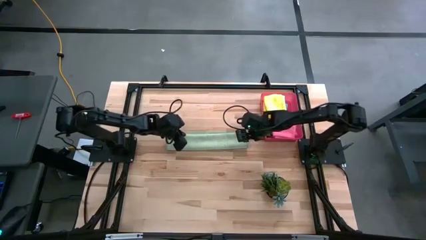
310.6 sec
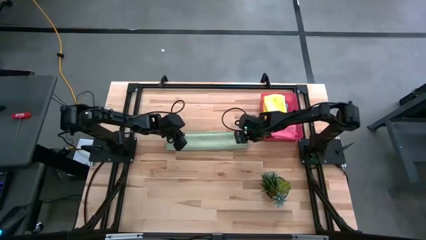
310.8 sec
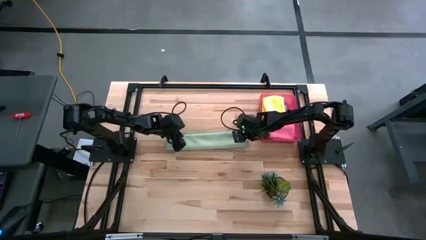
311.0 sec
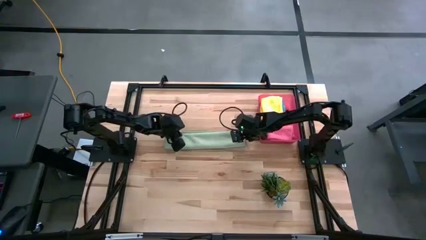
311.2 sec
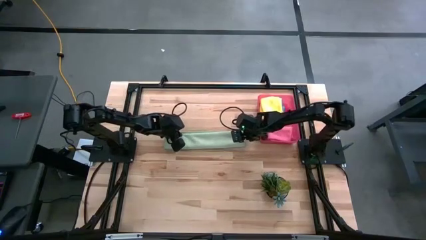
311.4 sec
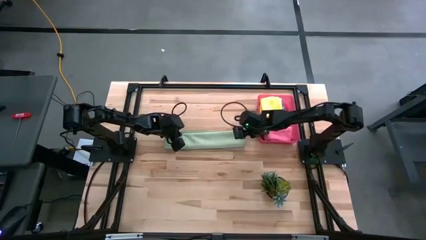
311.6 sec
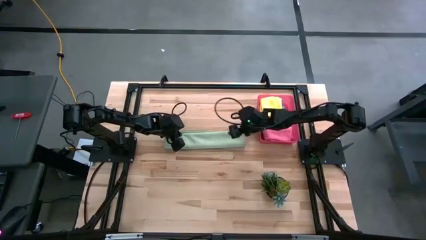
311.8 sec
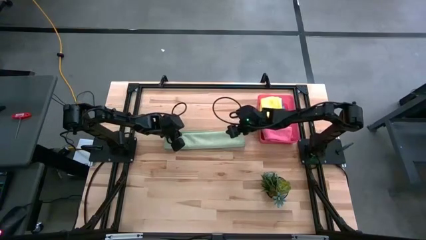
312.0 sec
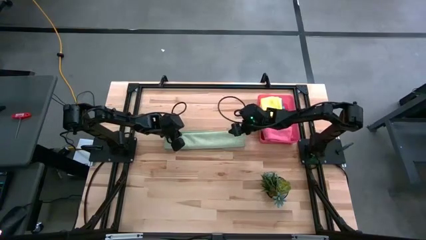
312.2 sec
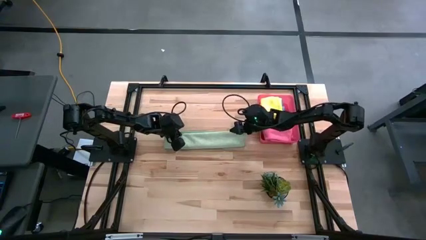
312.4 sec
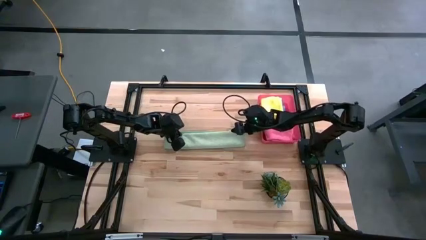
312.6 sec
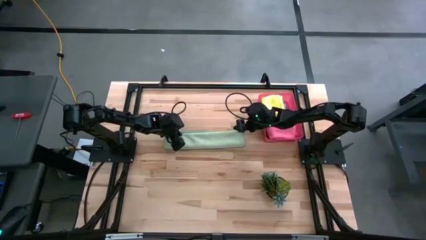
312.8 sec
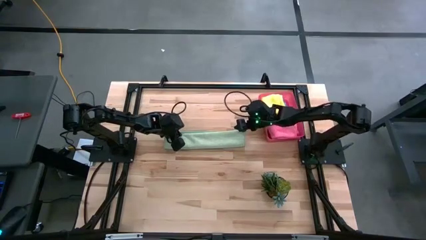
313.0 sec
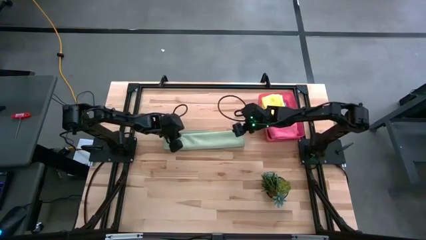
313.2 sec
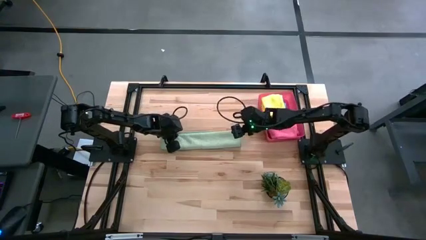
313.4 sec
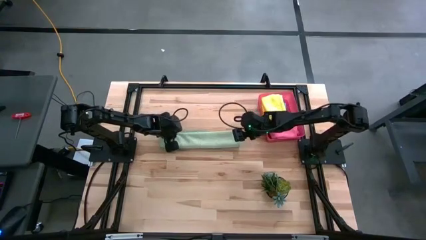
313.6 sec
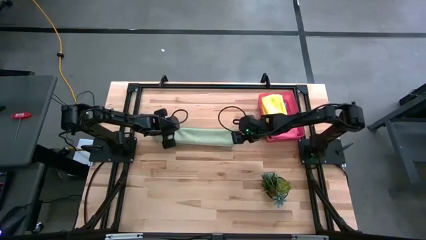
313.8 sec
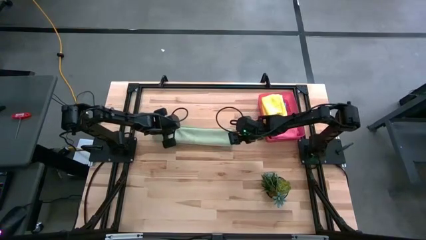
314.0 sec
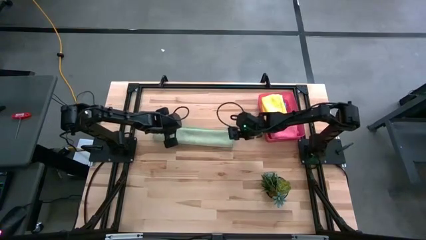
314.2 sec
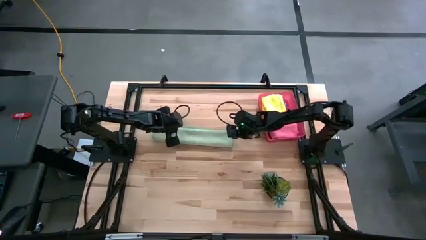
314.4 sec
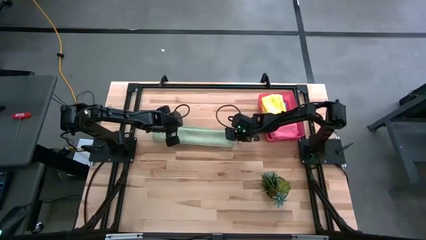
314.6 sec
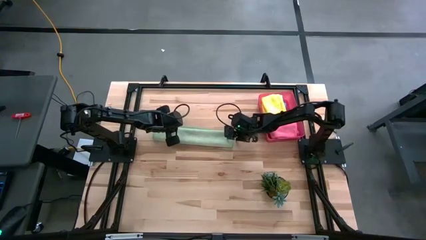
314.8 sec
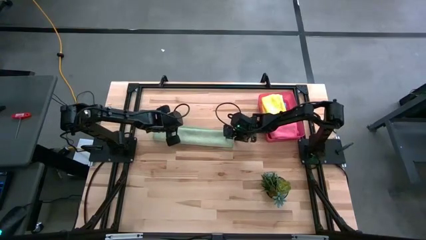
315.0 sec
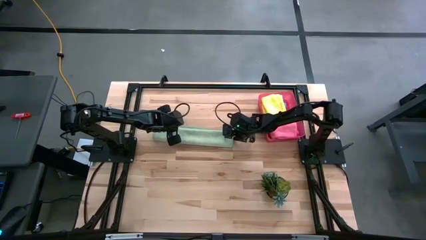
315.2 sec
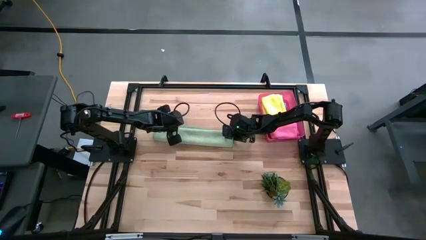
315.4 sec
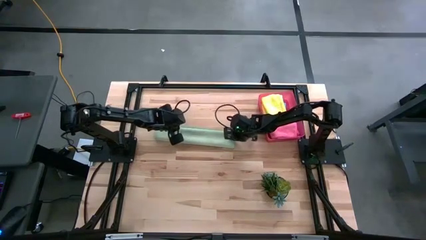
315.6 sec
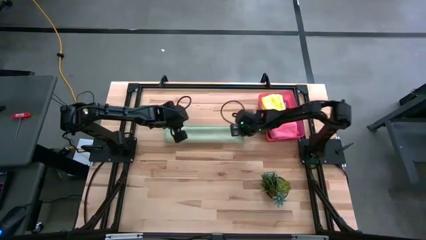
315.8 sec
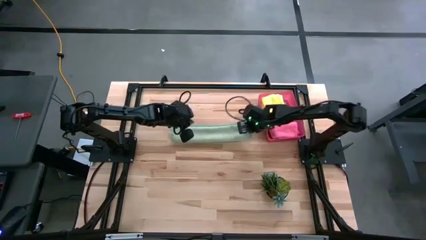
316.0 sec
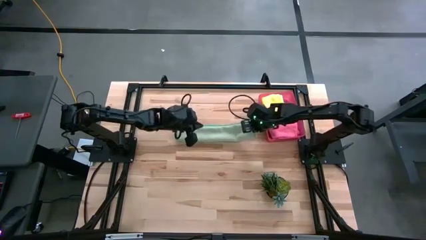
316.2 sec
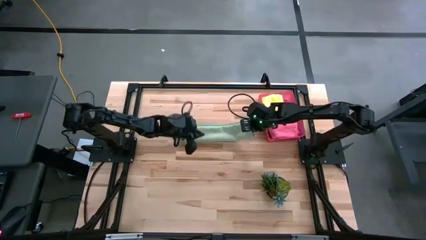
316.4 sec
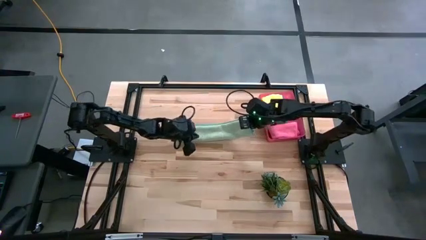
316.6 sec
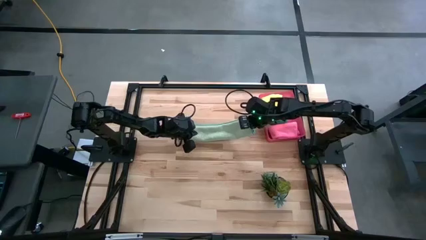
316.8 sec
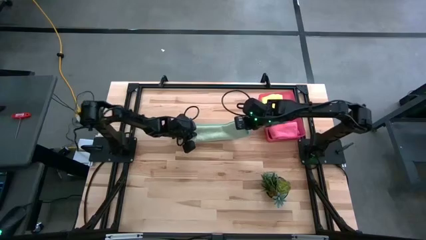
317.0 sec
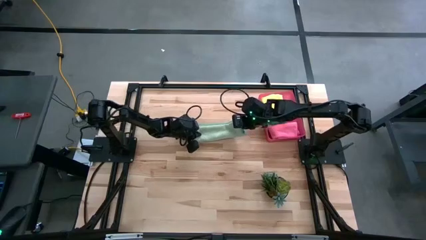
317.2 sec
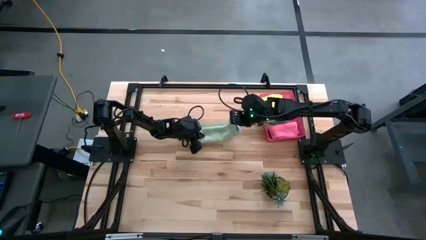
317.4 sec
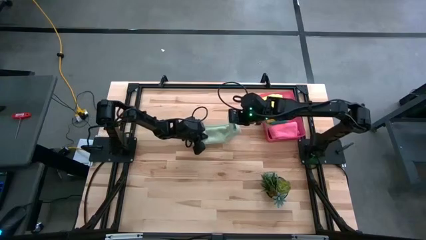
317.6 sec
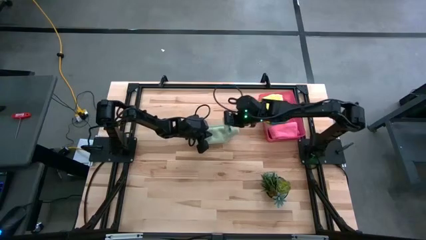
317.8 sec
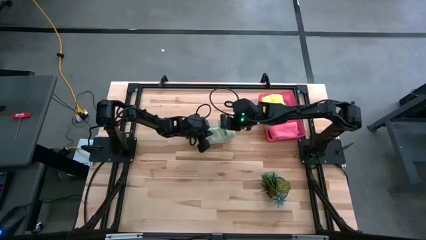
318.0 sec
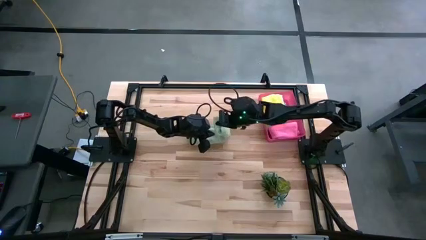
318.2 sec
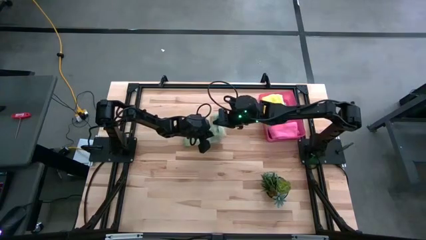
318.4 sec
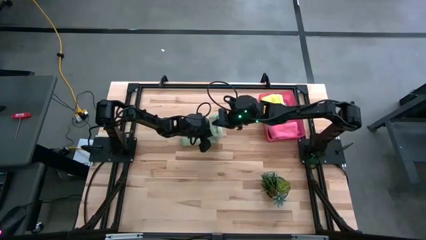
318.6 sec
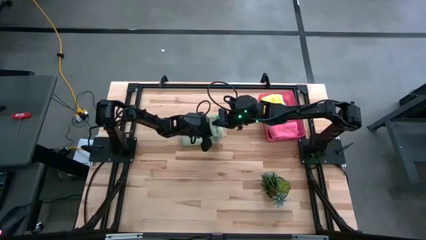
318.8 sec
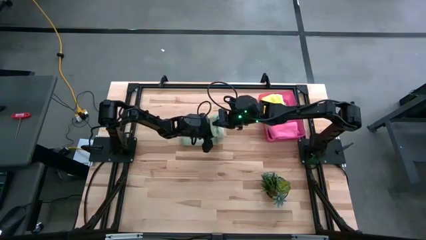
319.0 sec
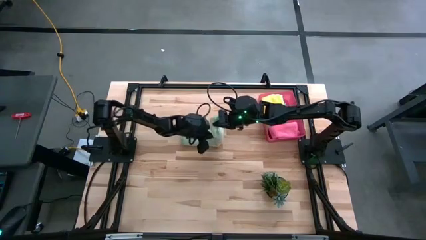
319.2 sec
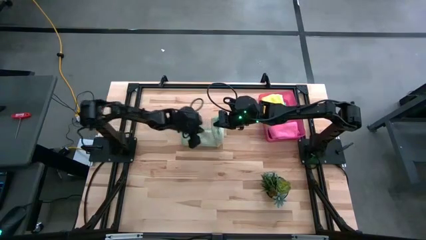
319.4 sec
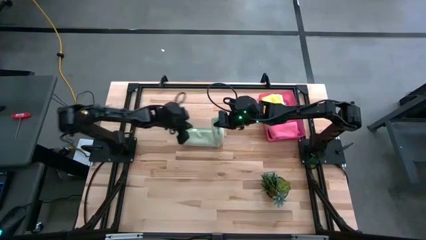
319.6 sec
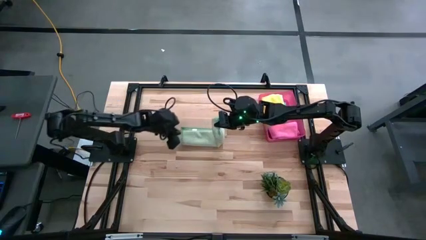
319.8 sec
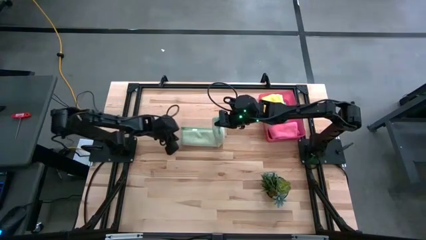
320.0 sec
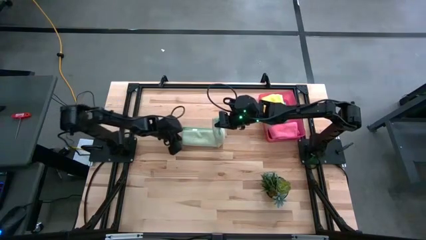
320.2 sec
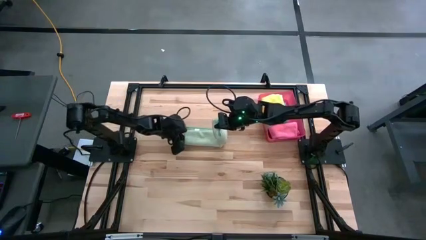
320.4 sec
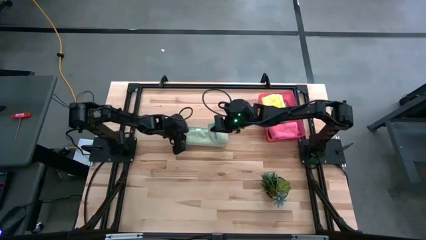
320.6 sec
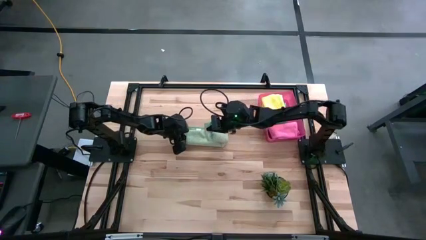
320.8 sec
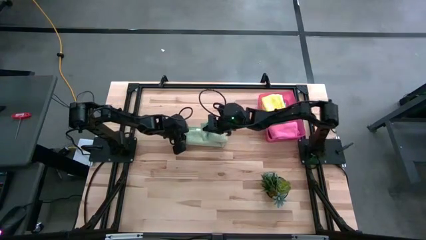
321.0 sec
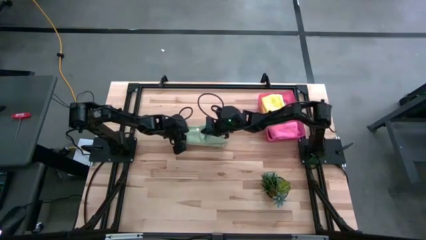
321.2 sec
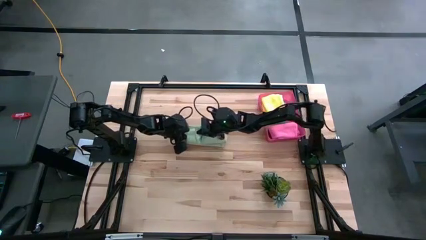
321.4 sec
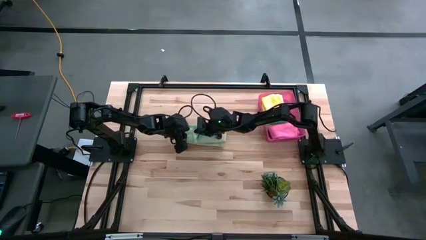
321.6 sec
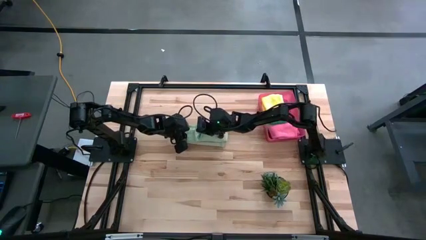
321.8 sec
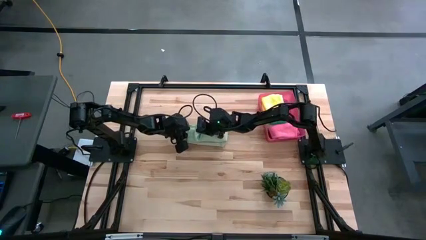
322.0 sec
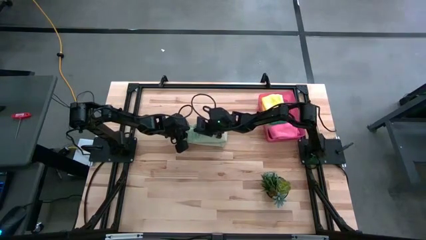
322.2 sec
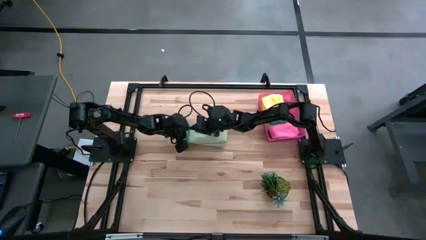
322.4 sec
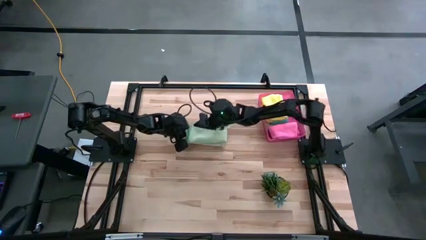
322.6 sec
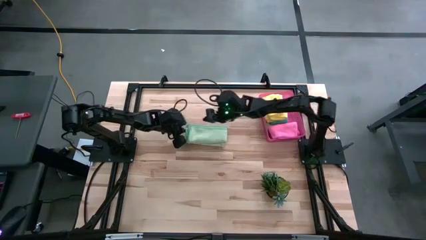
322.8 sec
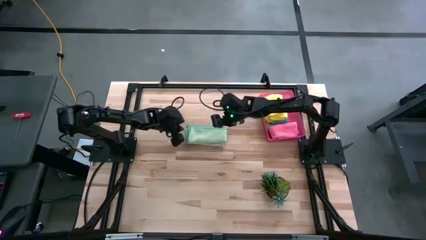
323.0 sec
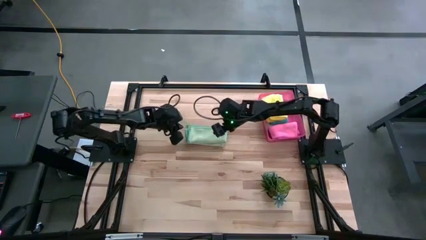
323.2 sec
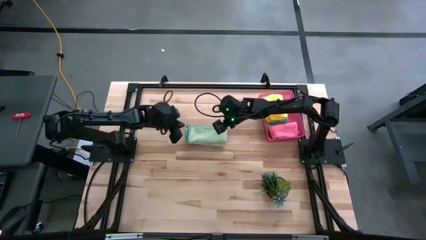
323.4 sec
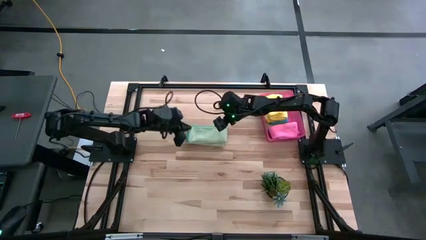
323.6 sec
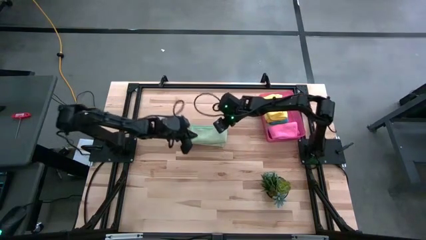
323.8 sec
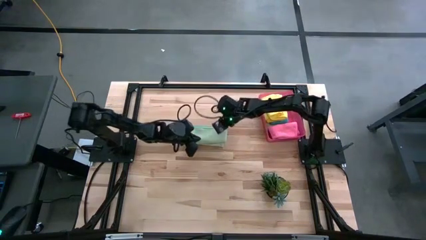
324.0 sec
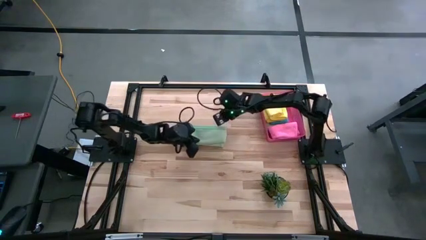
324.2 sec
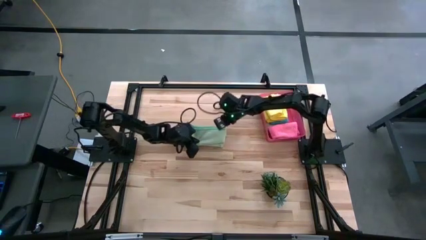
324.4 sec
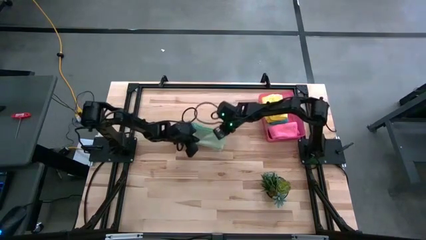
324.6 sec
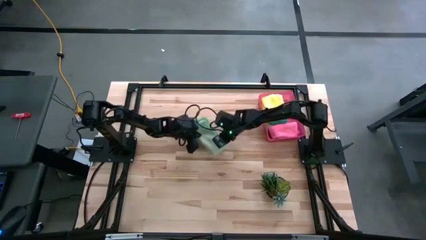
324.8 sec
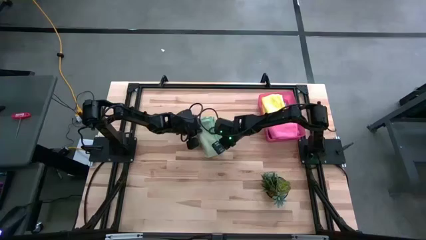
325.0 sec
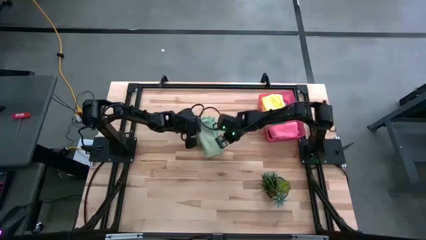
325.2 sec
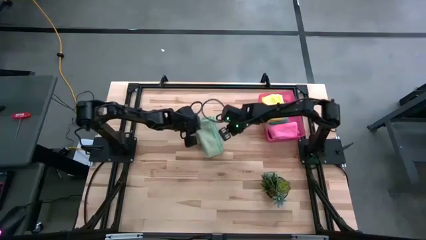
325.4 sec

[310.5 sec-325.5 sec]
Task: Fold microfiber towels
Fold the light green microfiber cloth

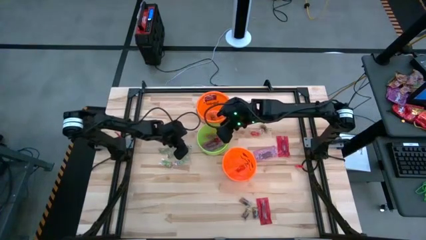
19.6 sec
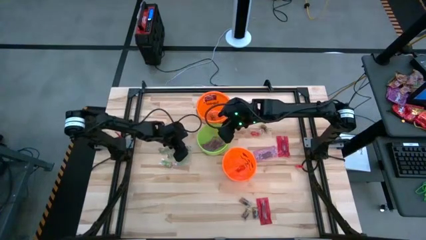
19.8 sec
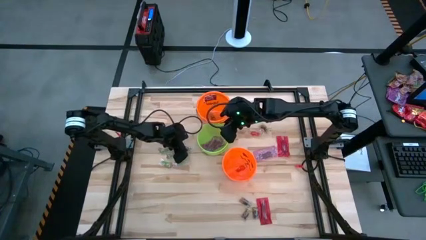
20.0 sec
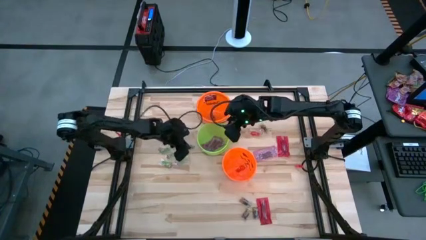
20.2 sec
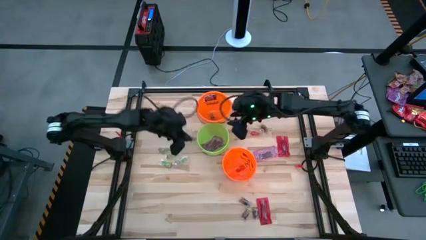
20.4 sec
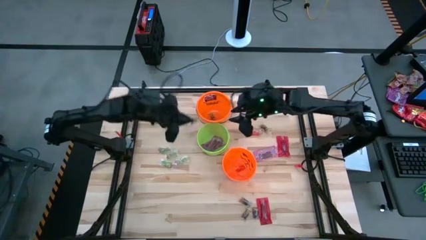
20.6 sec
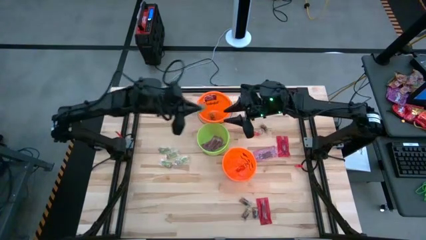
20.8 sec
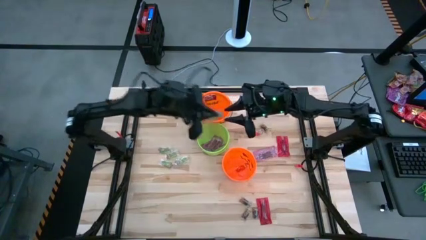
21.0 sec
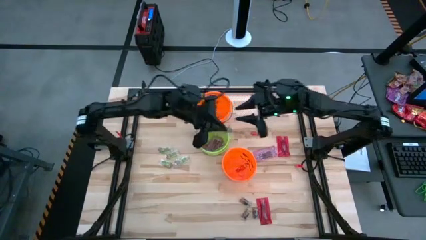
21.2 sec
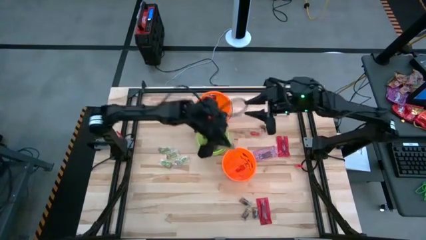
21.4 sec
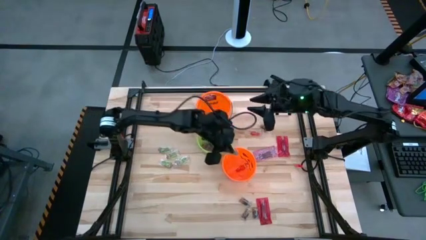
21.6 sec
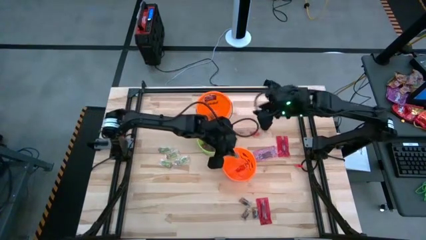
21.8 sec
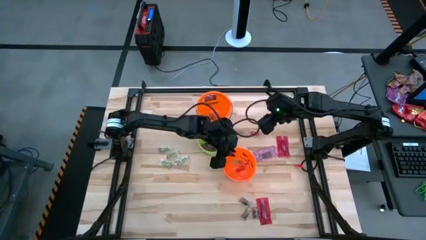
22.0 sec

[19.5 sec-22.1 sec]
Task: Sort candy by brand, put in halloween buckets
Put the green gummy into the bottom orange bucket
